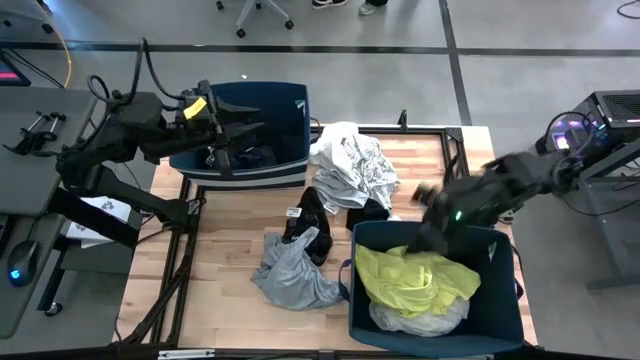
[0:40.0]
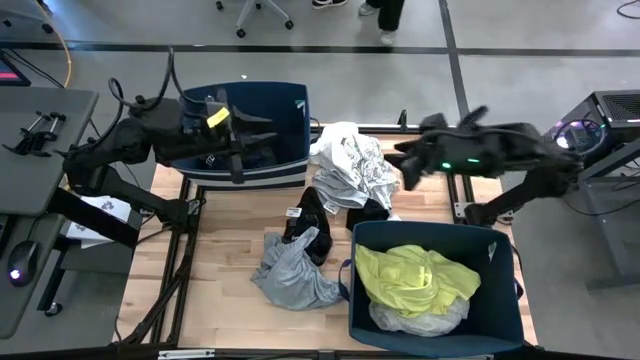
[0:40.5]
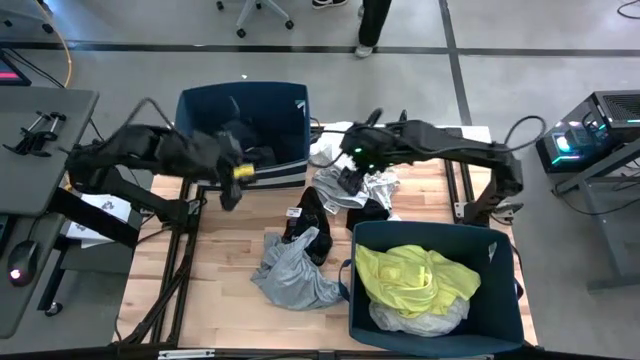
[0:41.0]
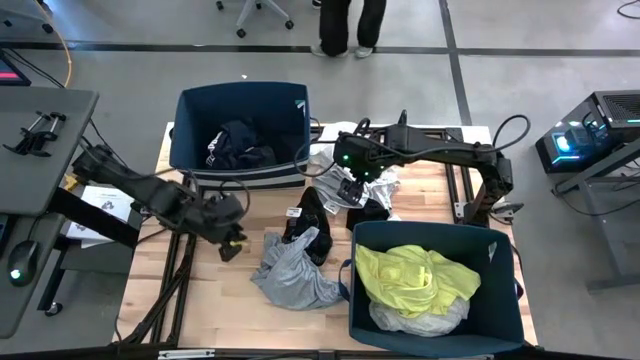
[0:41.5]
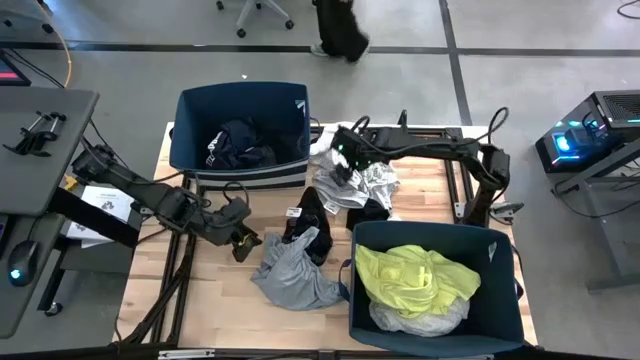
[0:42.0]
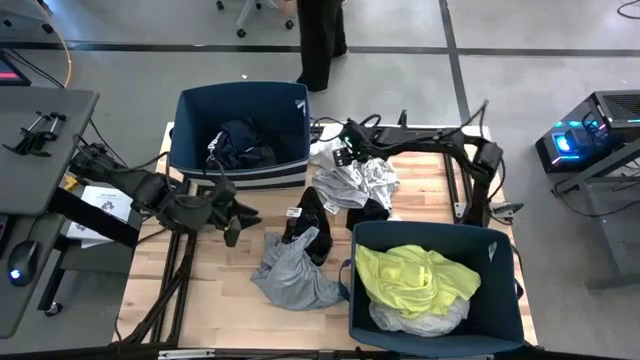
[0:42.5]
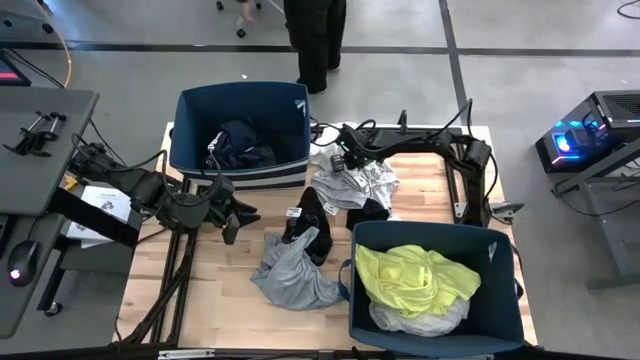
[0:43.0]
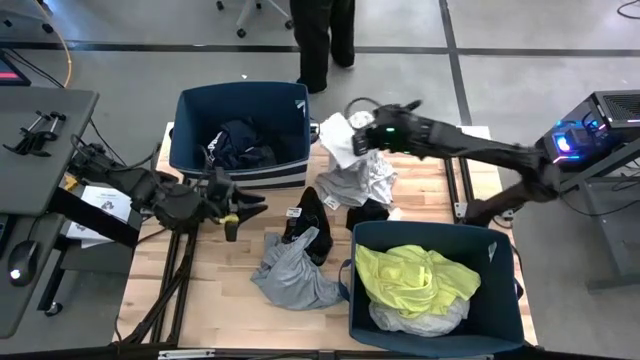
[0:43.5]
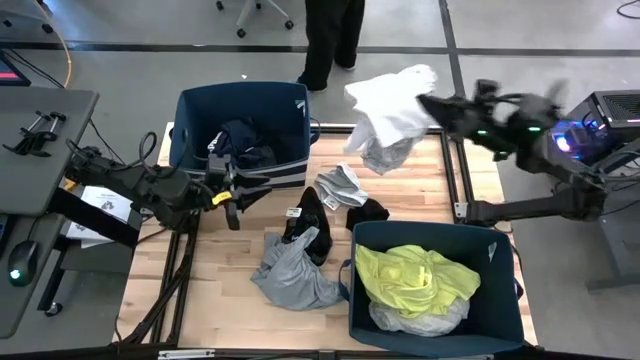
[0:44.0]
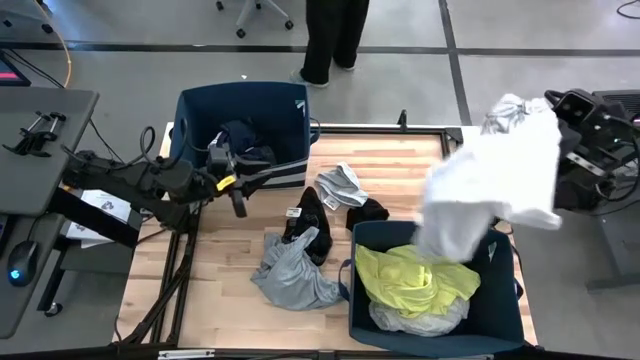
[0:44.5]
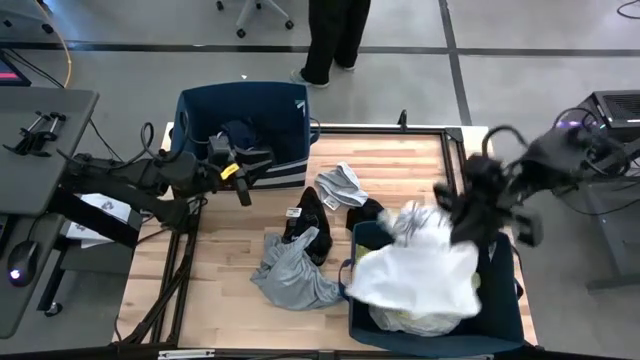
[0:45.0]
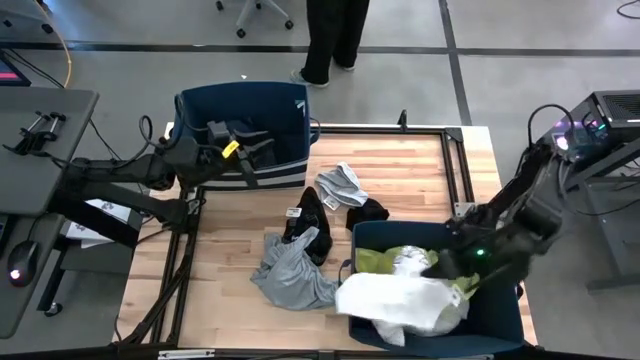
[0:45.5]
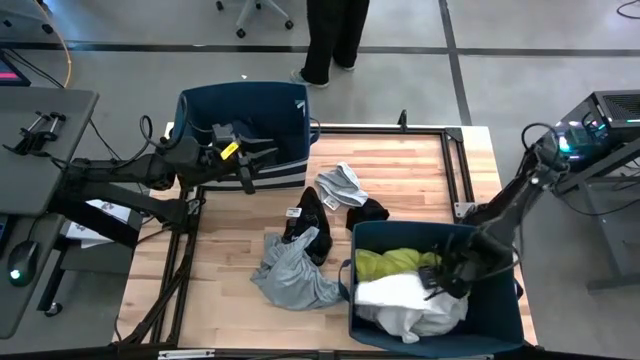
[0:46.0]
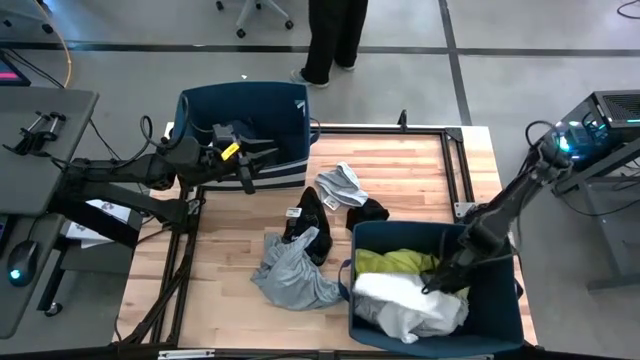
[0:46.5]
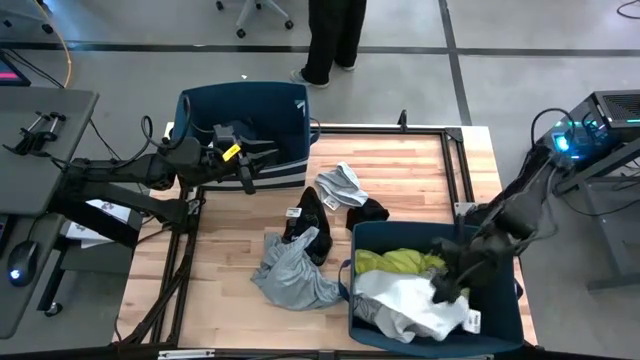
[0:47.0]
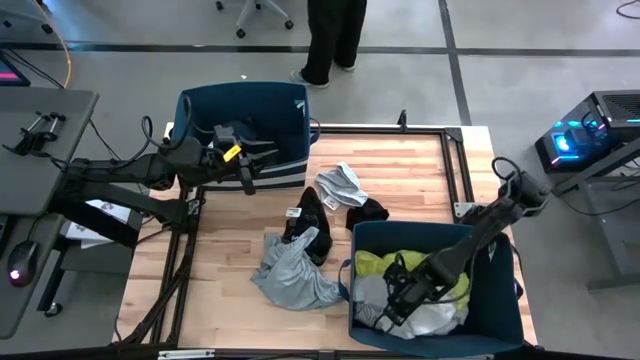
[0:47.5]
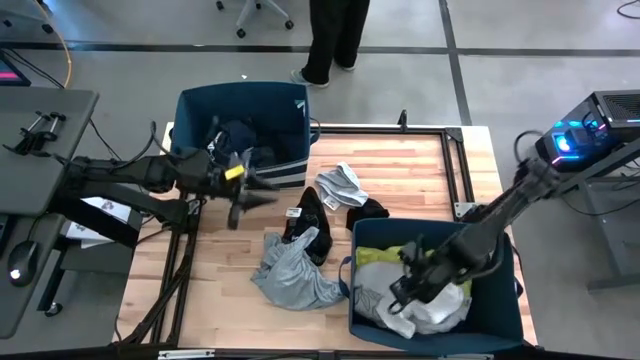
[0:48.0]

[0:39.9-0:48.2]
Task: Sort clothes
Put the white patterned shirt into the bottom blue laundry bin

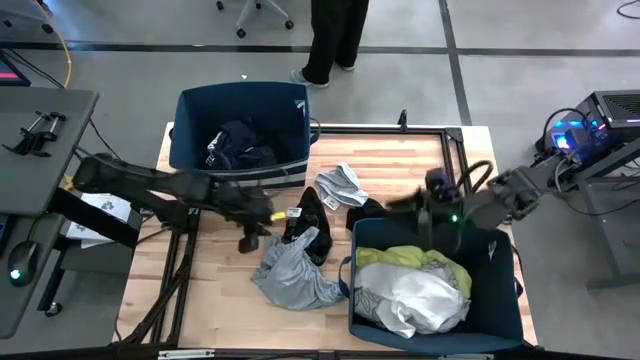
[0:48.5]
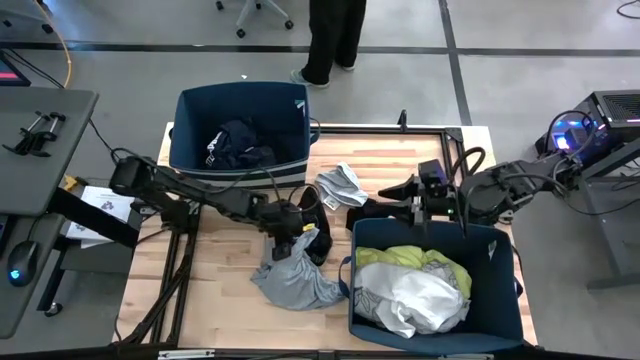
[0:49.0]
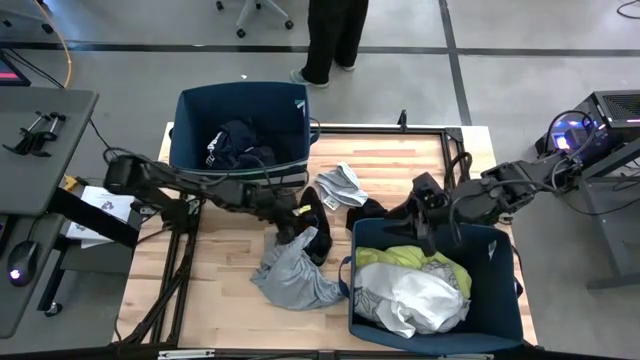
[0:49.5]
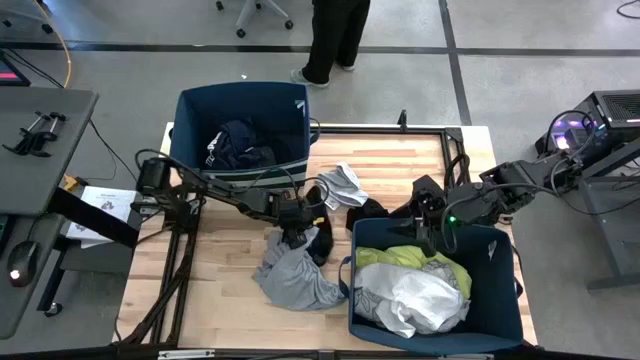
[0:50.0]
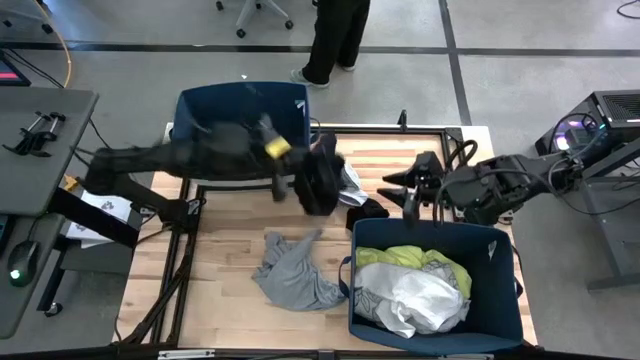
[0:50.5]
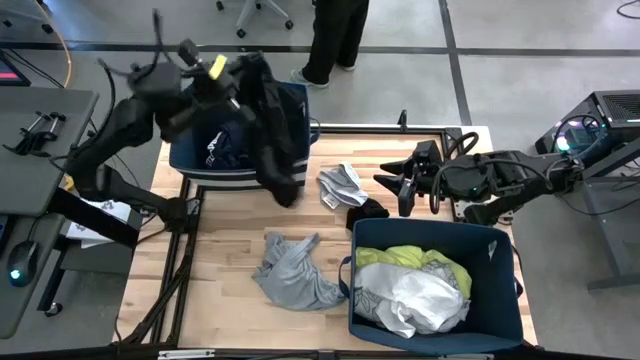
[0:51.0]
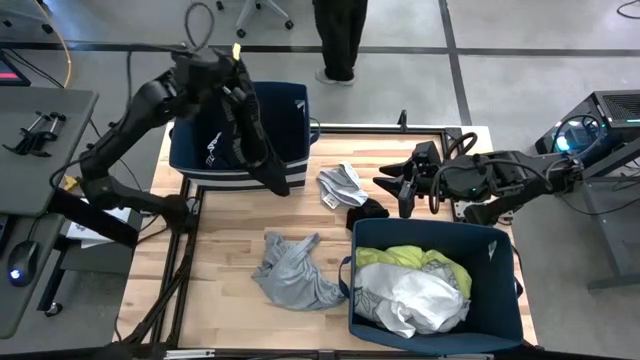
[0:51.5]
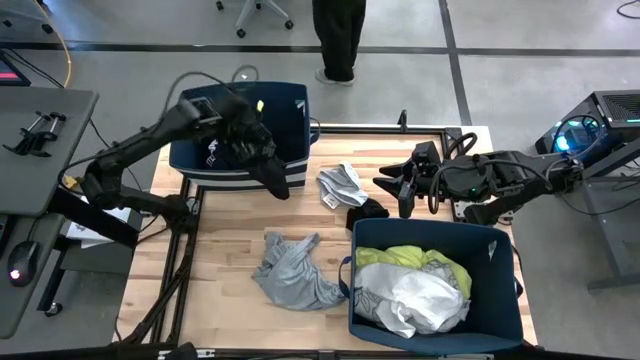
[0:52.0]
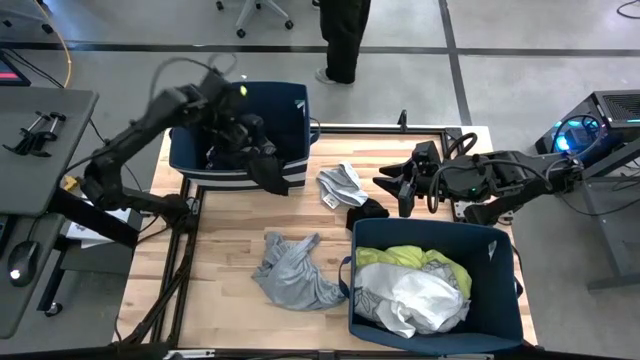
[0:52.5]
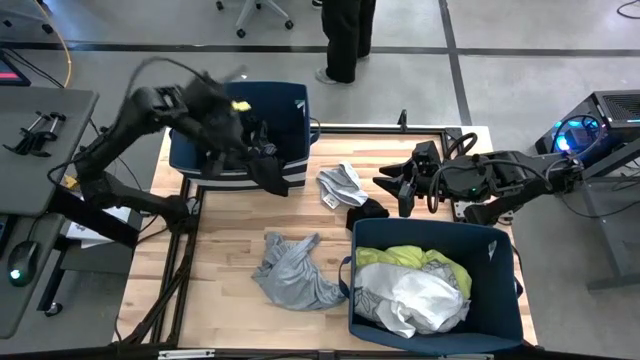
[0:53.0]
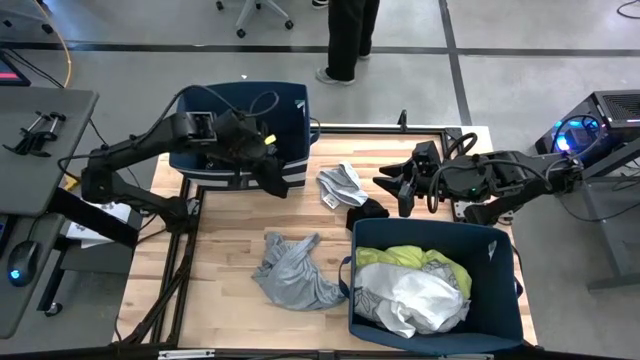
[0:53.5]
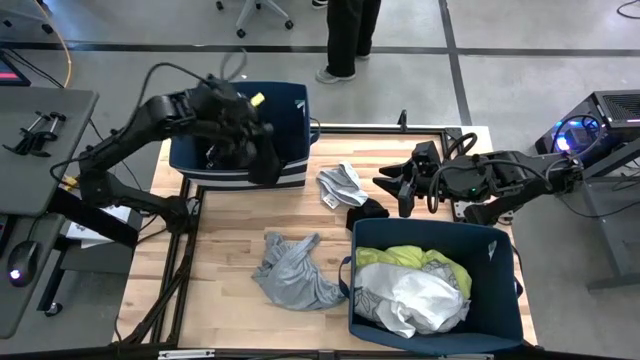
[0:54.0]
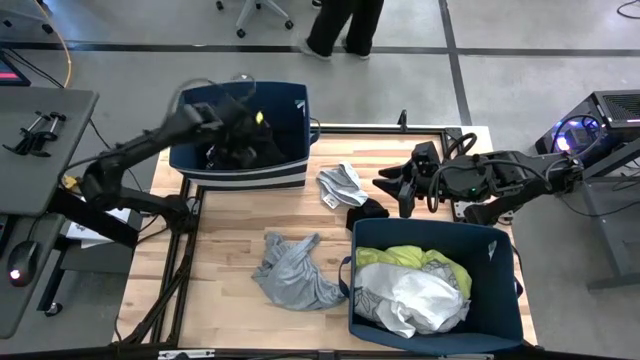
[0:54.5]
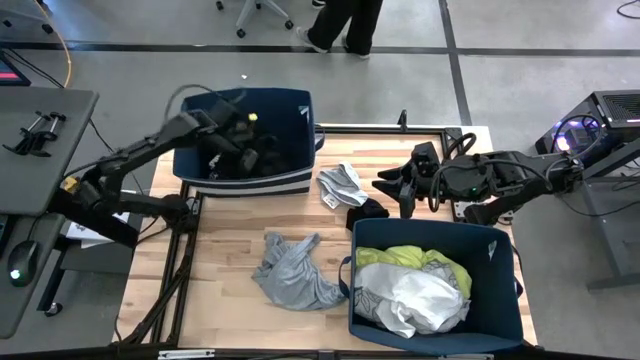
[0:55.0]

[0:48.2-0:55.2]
Put the black boxer shorts into the top blue laundry bin

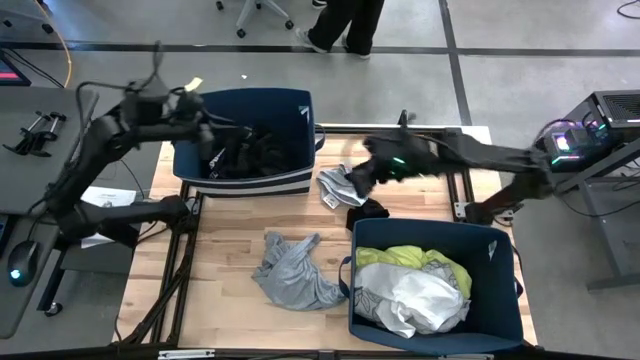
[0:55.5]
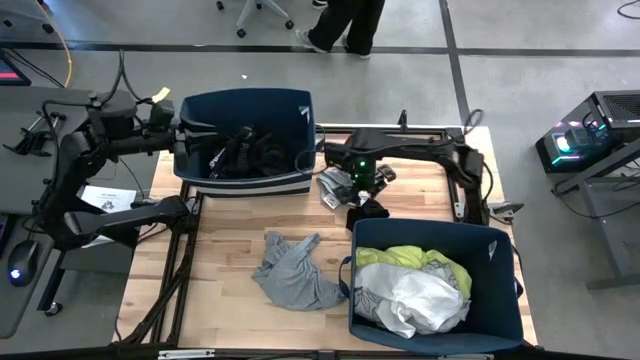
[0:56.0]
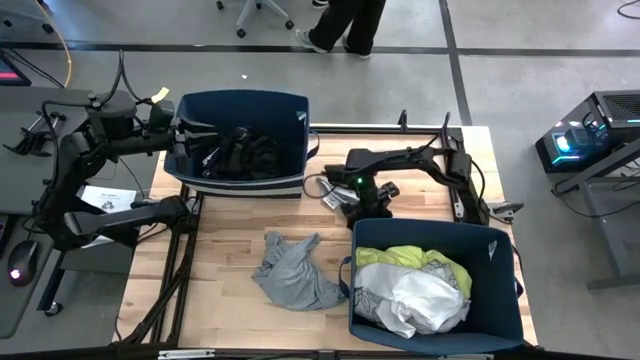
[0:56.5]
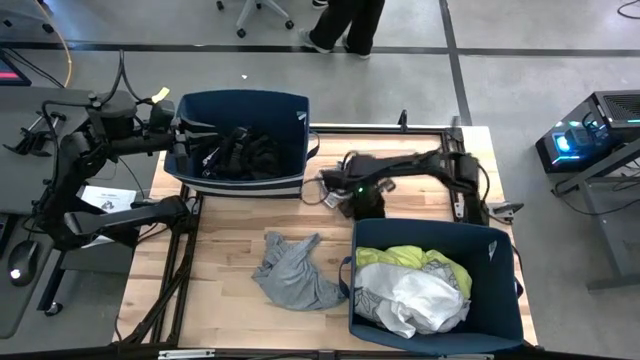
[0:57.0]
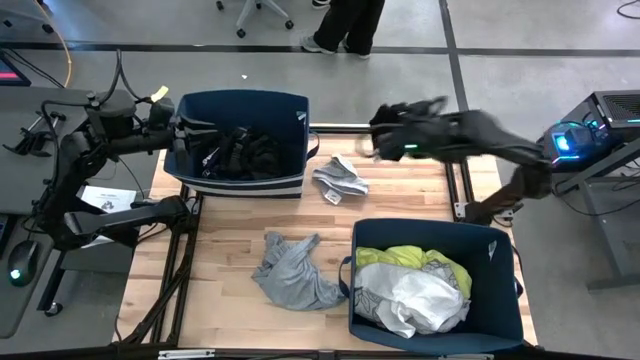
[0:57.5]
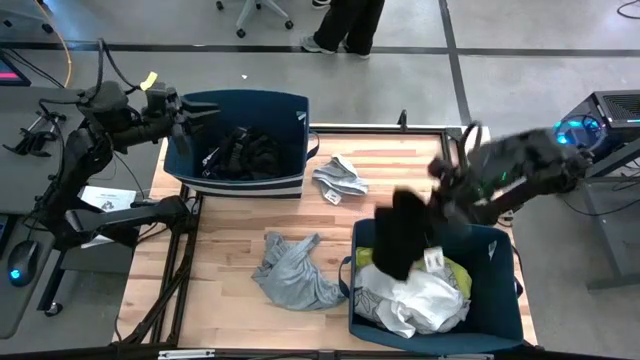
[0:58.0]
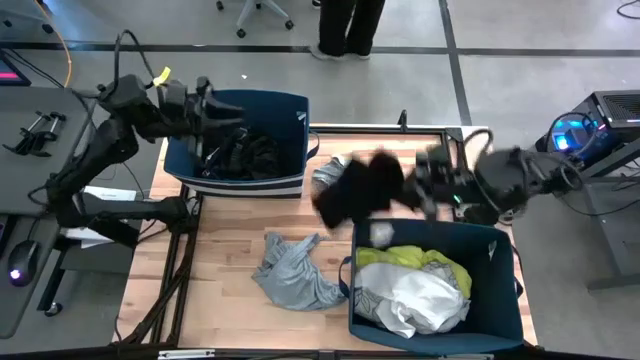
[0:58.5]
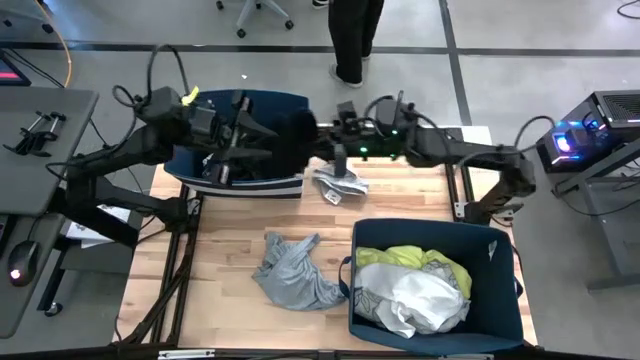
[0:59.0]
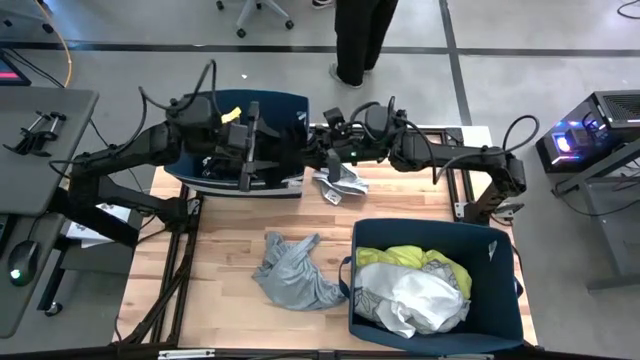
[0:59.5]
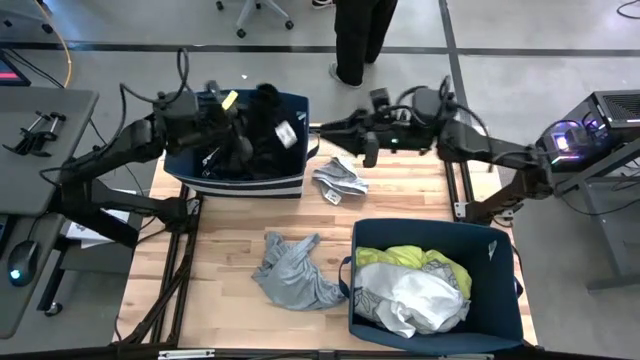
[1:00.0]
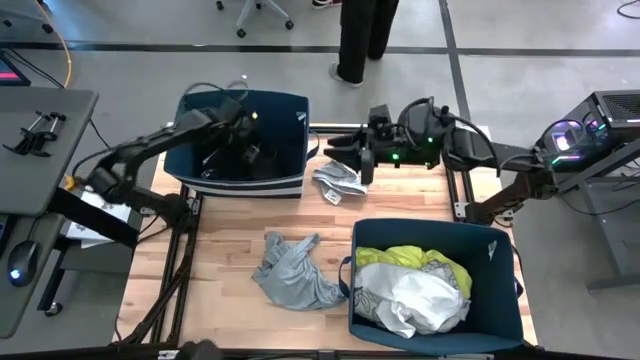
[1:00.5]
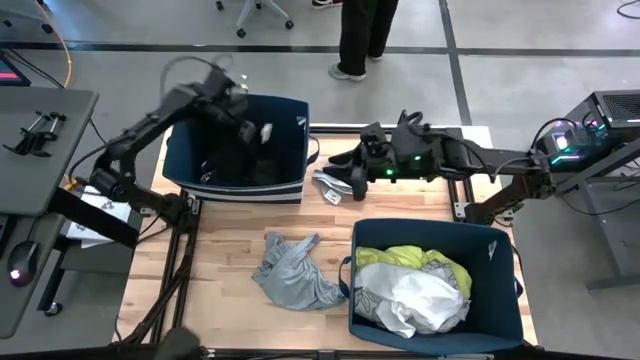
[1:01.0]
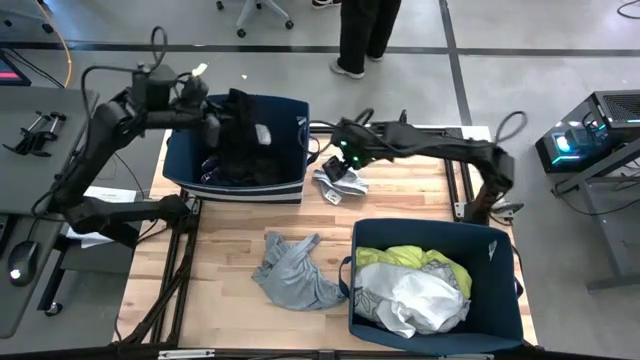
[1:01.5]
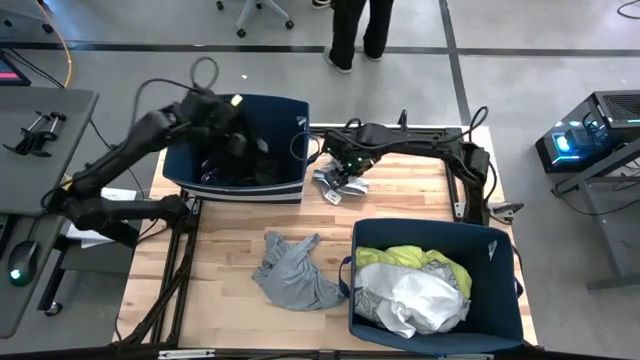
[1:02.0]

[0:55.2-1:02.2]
Put the black shorts into the top blue laundry bin
